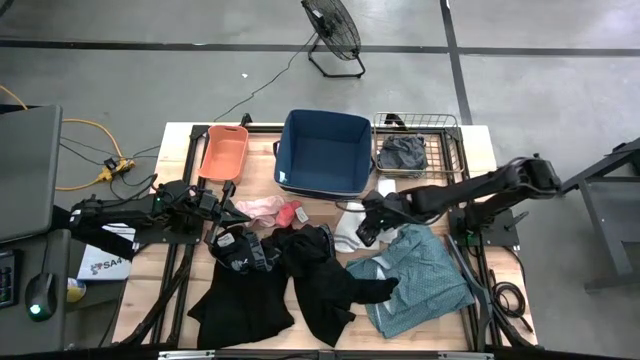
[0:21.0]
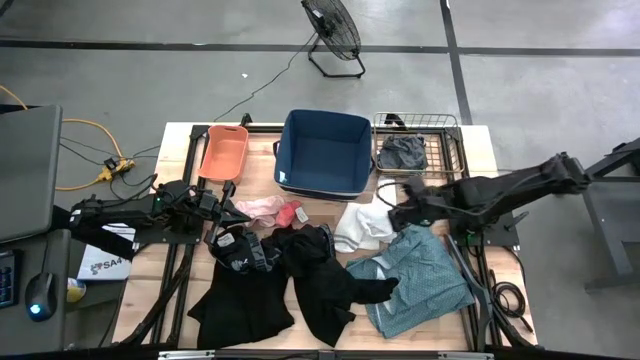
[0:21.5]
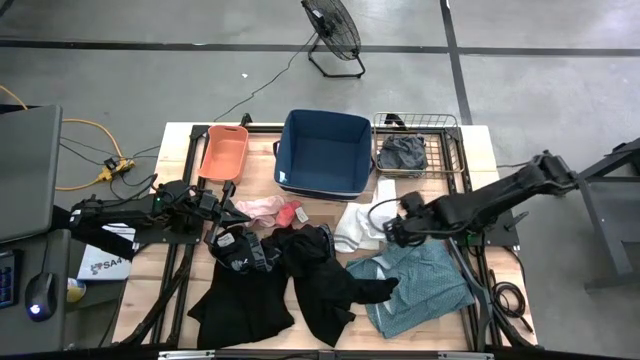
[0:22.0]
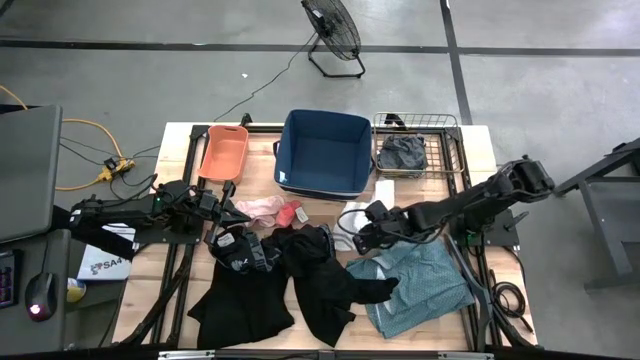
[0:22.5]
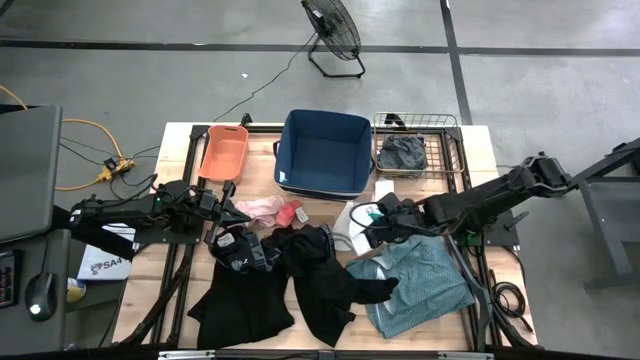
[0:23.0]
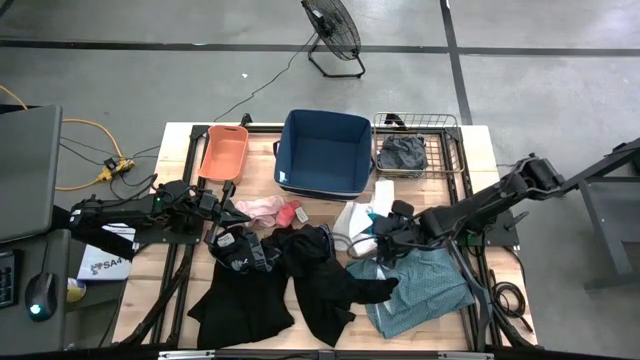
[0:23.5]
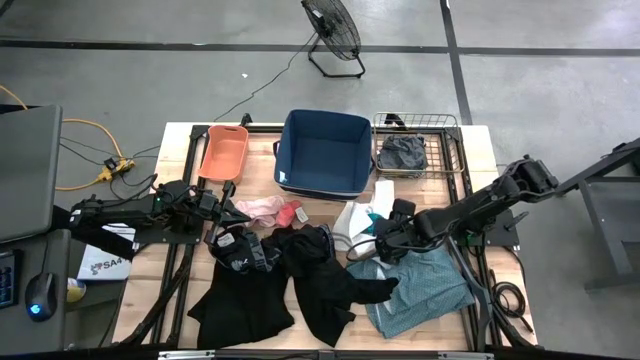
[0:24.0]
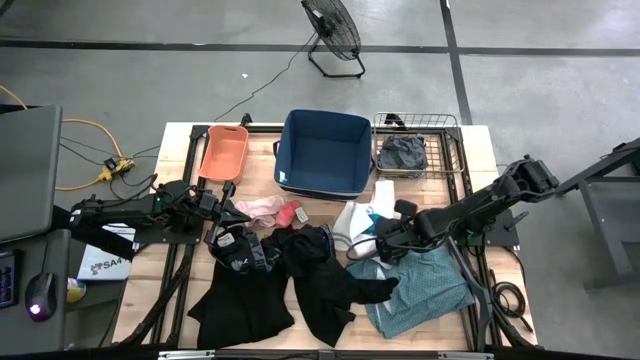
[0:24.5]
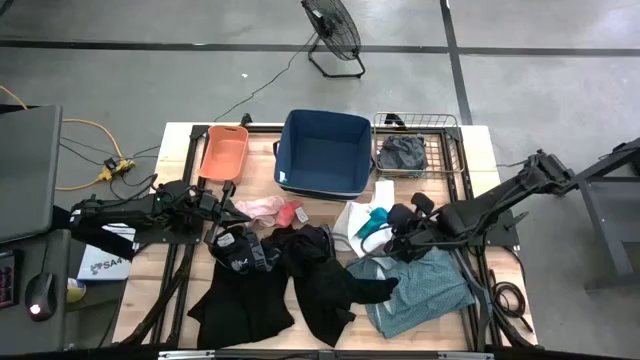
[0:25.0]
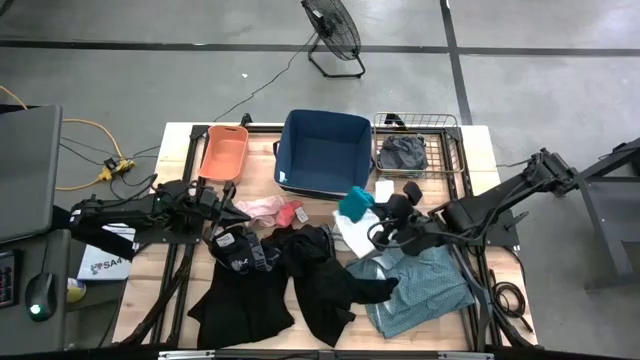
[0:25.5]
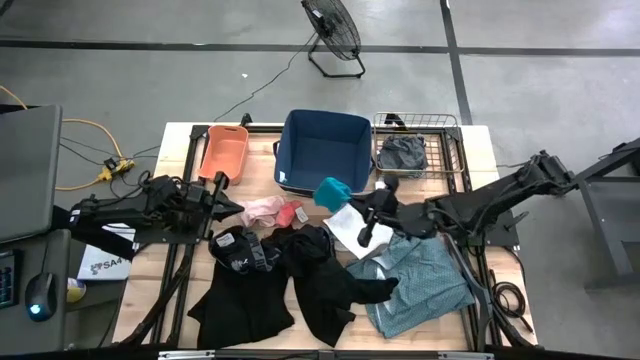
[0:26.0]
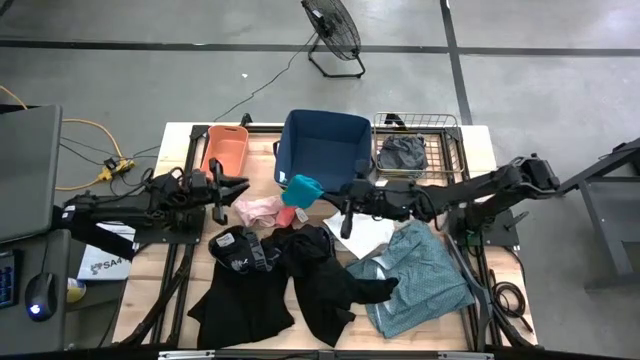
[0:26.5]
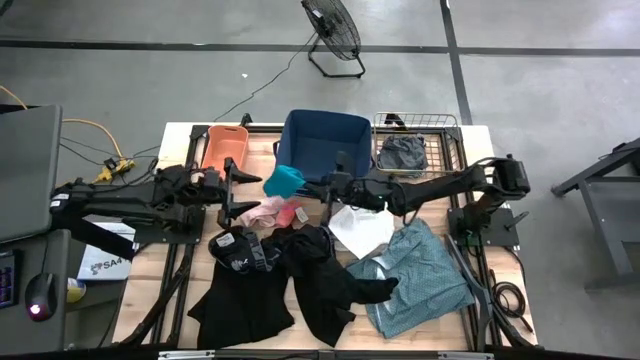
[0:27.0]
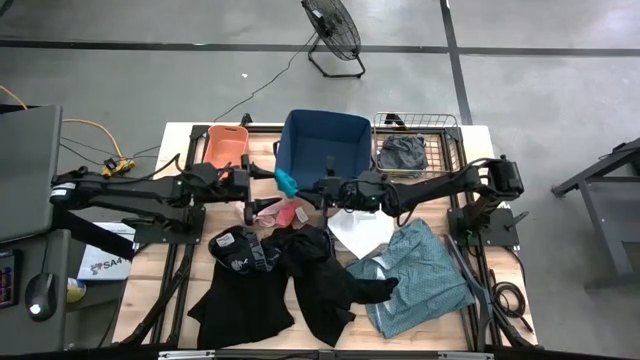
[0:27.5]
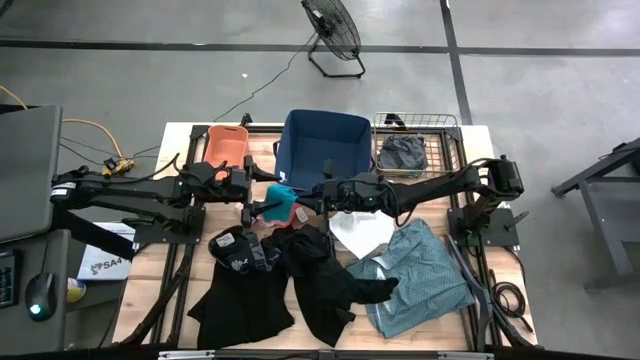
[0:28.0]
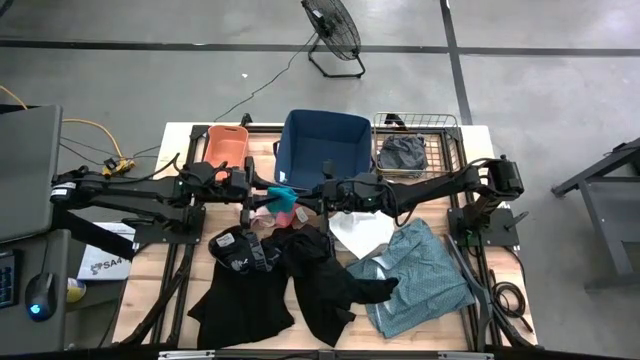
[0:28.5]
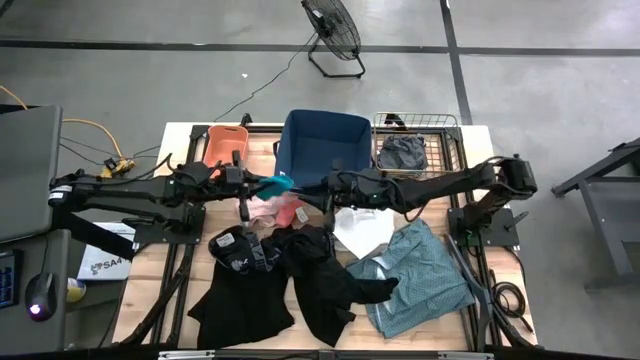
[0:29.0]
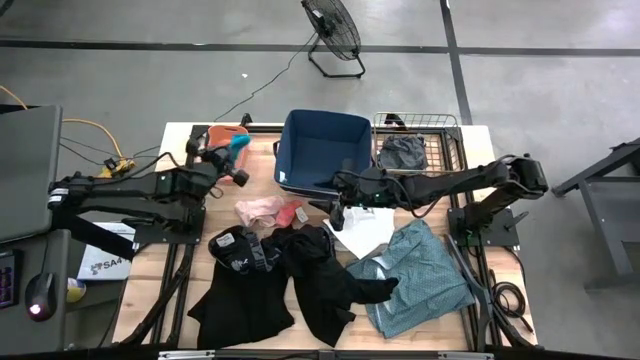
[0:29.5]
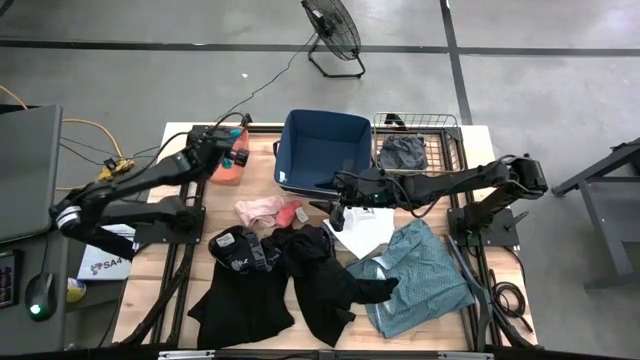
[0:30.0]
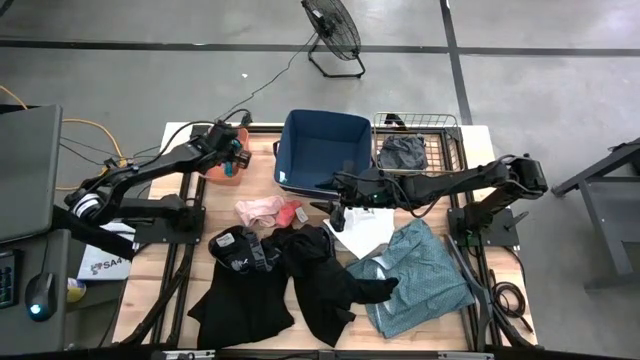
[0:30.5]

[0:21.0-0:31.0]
Task: Pick & Place Cloths
Put the blue sock into the orange bin

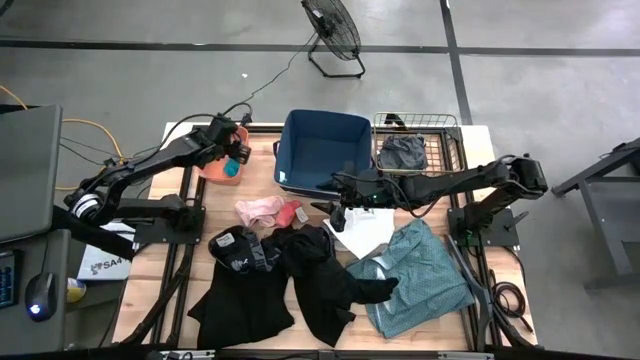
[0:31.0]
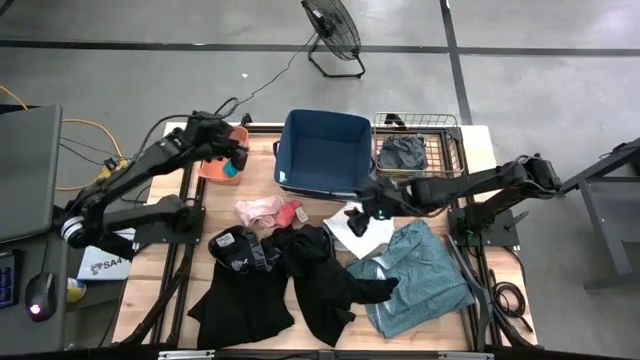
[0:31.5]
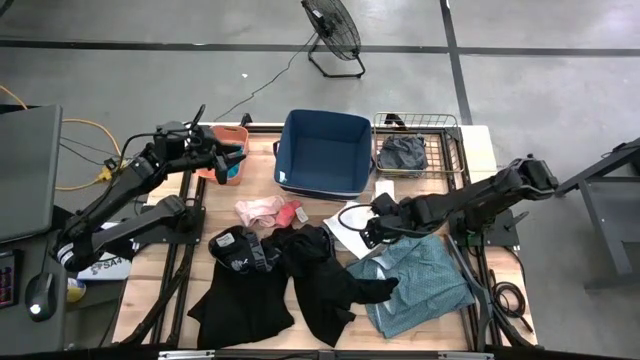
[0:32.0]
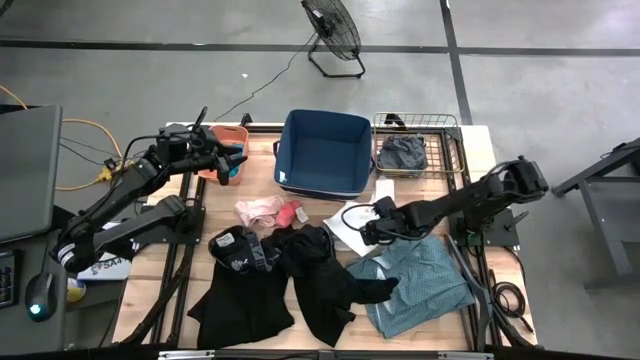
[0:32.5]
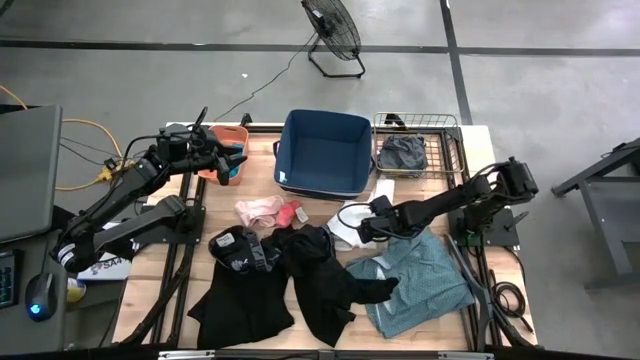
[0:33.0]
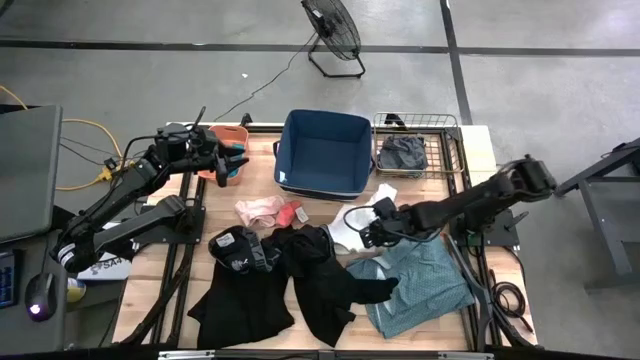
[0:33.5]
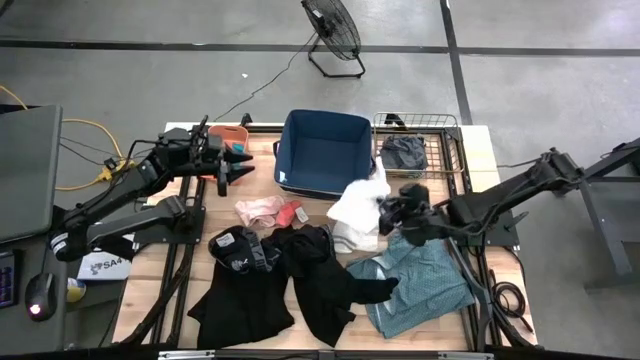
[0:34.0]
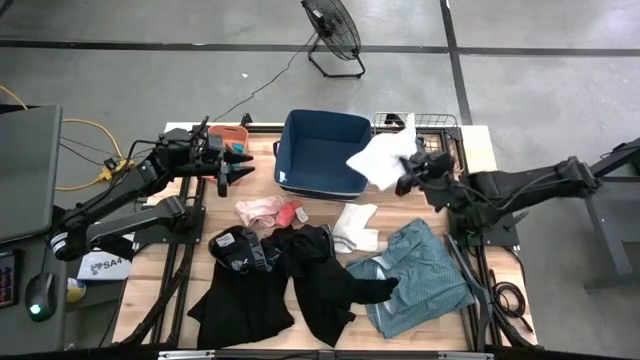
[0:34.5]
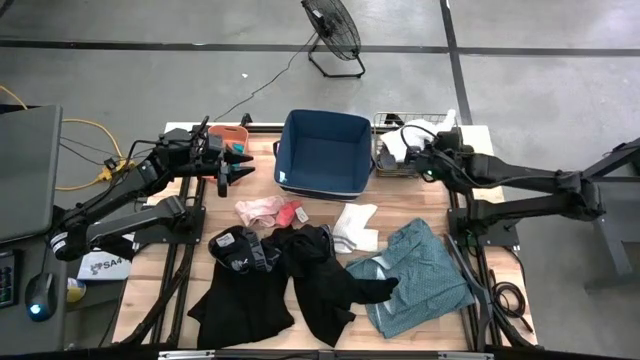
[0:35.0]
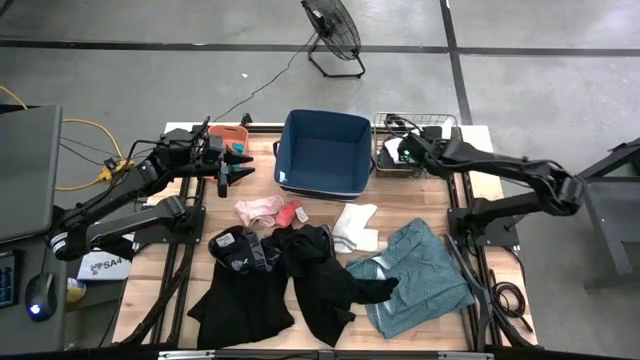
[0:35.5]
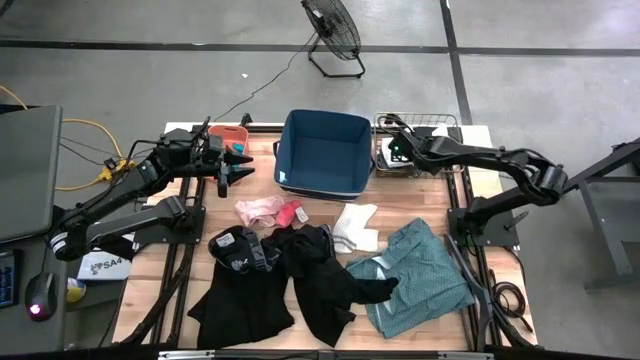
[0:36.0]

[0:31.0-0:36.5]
Put the white underwear into the gold wire basket

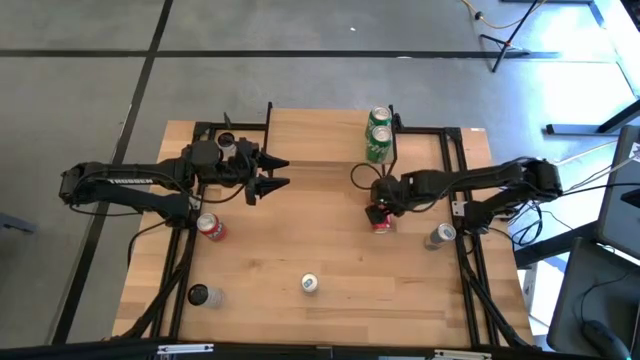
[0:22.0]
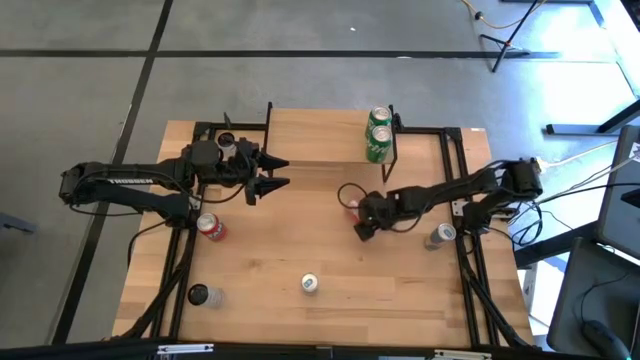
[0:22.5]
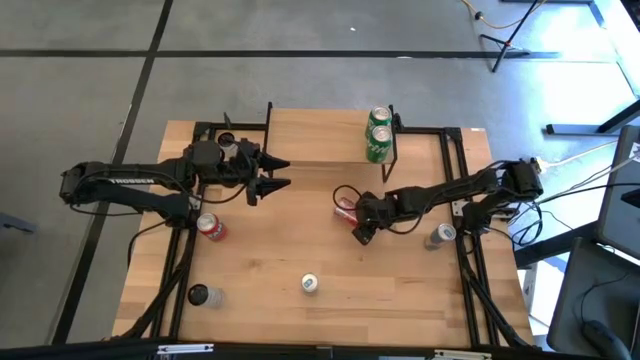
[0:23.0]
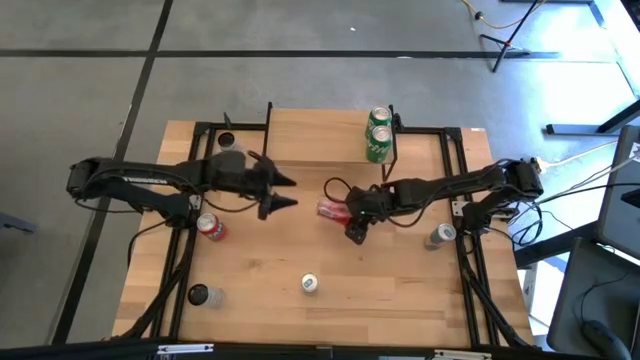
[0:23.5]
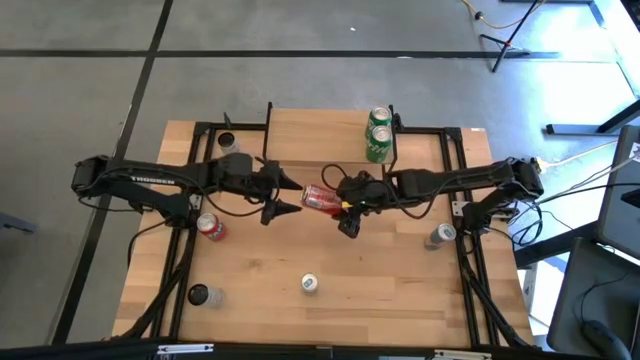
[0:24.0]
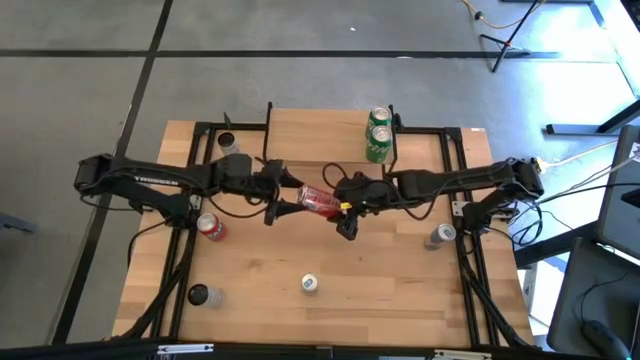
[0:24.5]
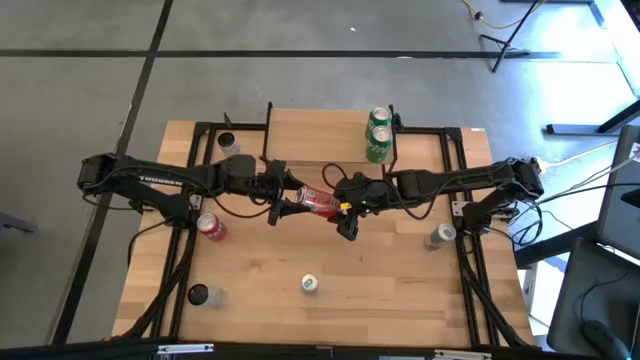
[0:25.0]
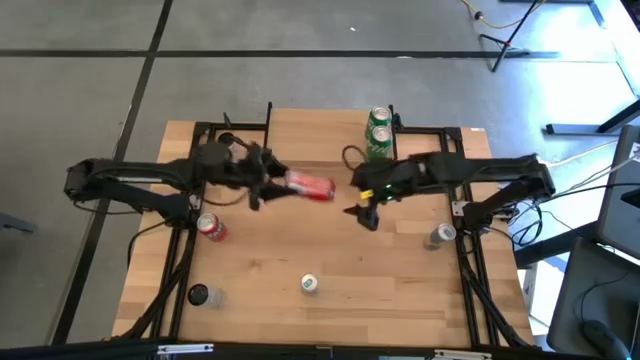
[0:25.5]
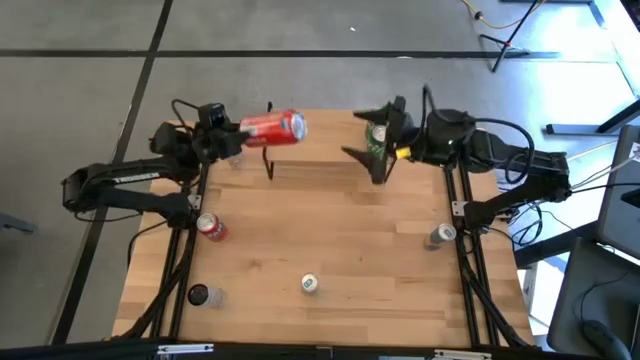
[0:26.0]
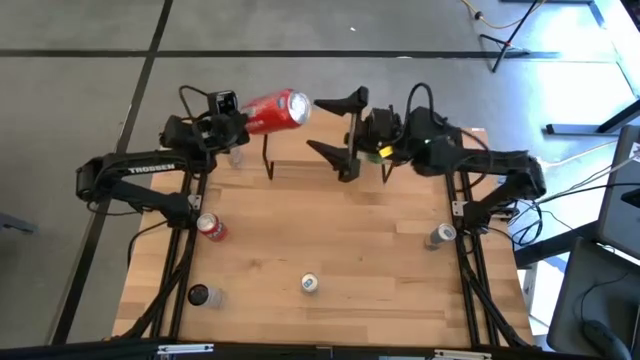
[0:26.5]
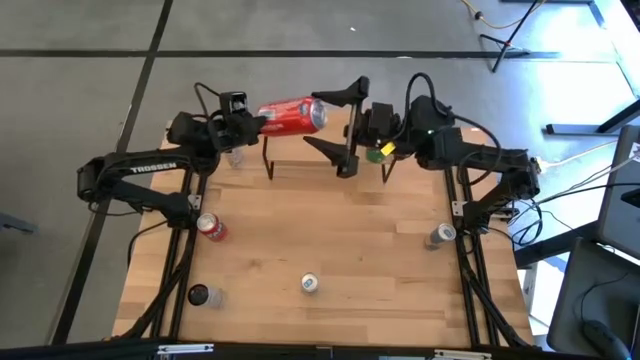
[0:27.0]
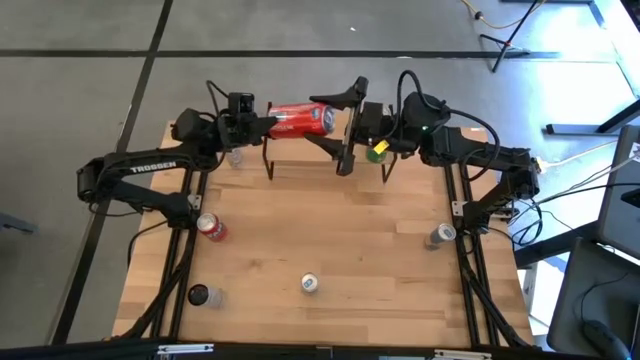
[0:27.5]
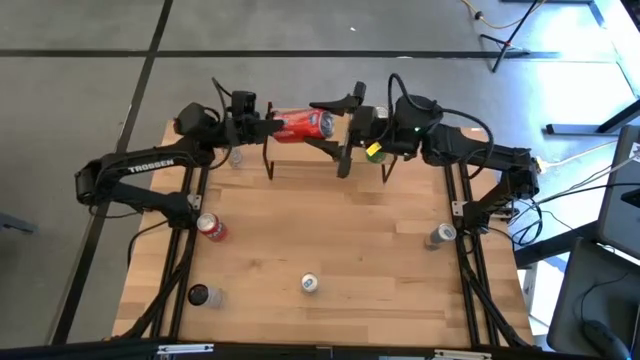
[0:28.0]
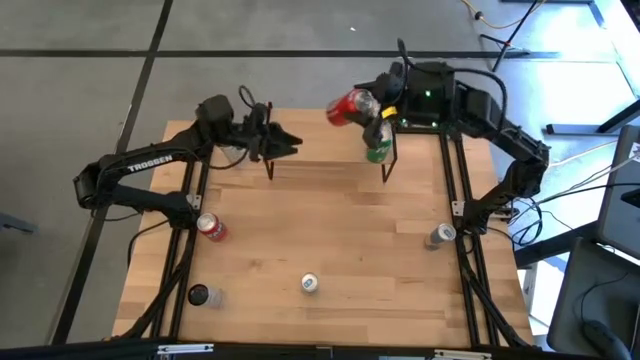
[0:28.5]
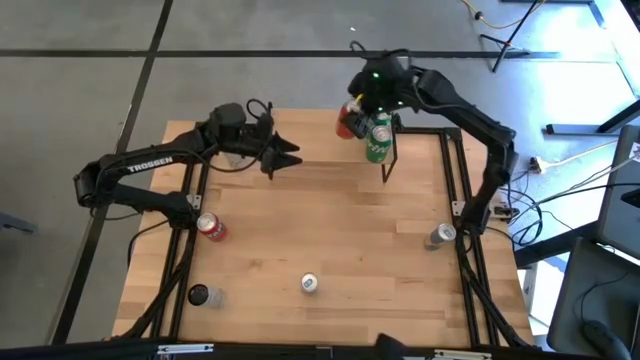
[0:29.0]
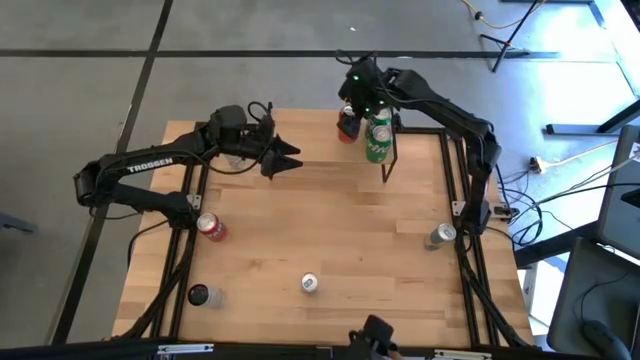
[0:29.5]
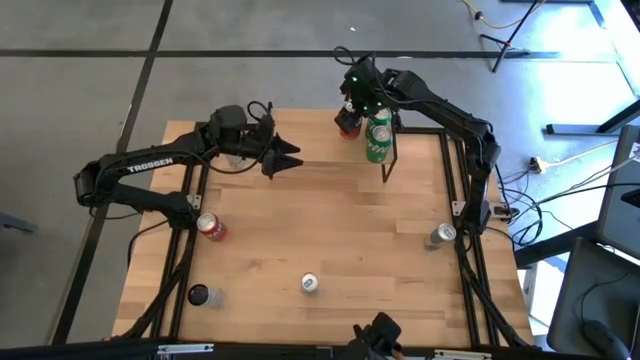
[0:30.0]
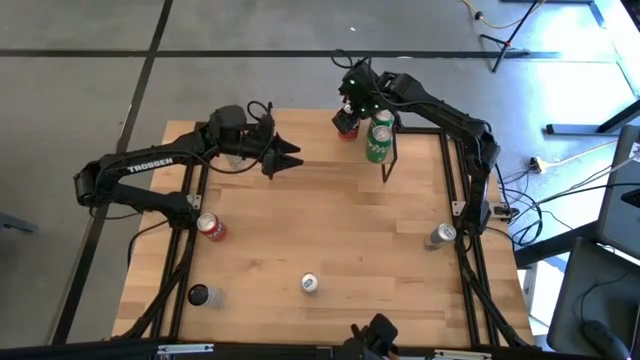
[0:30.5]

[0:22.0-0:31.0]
Task: Place canned beverage on shelf
Put the right orange soda can on the shelf
